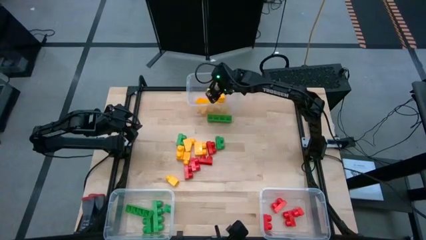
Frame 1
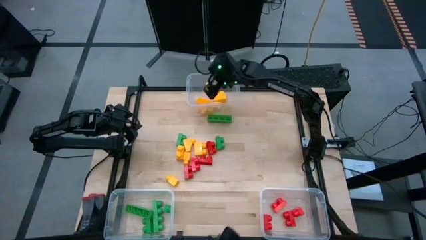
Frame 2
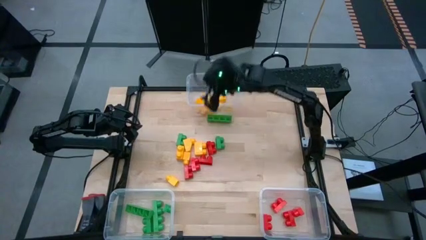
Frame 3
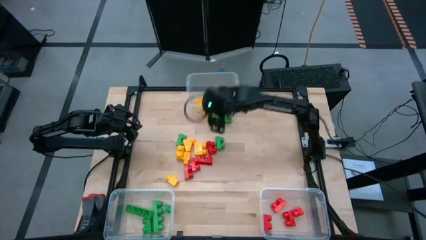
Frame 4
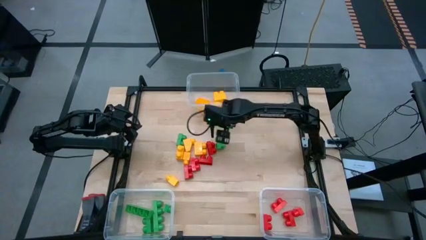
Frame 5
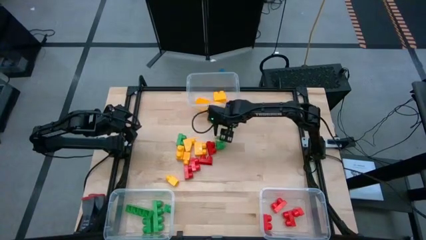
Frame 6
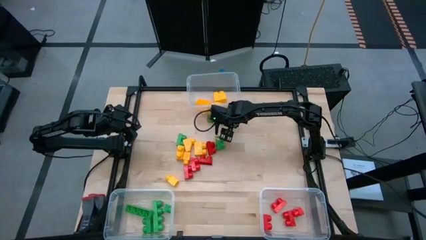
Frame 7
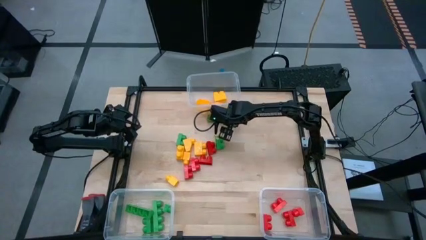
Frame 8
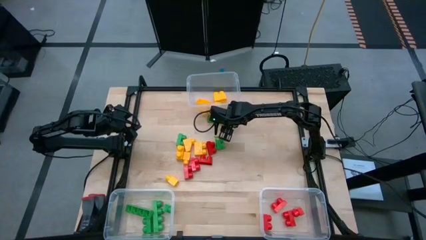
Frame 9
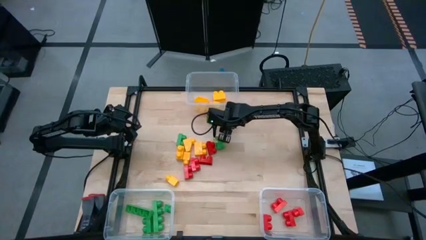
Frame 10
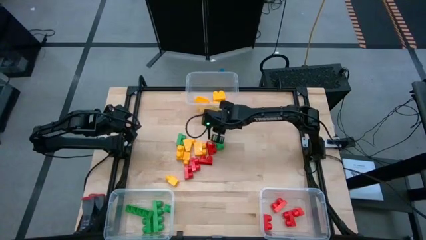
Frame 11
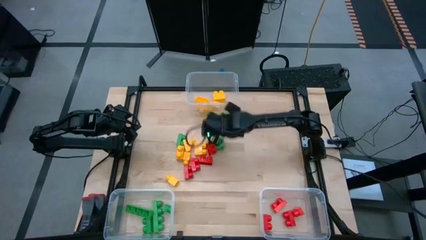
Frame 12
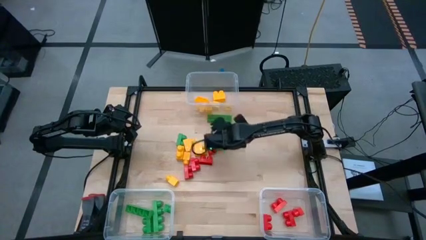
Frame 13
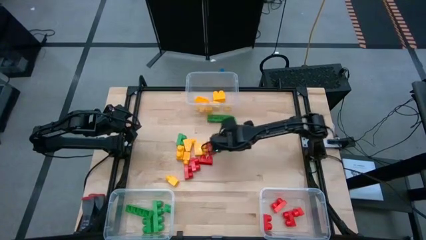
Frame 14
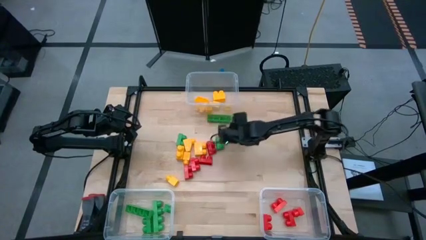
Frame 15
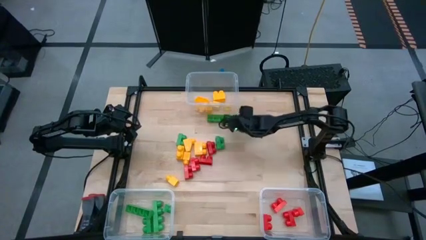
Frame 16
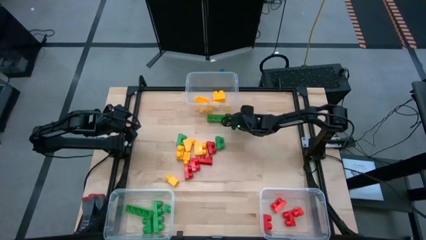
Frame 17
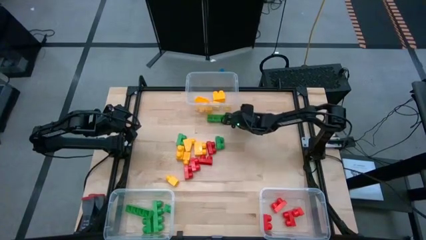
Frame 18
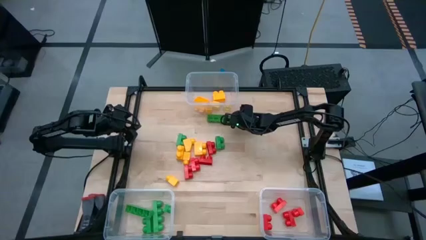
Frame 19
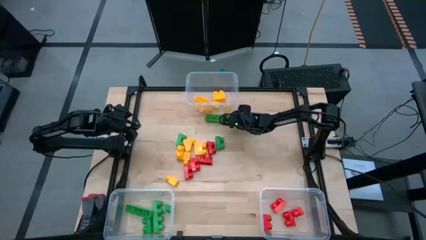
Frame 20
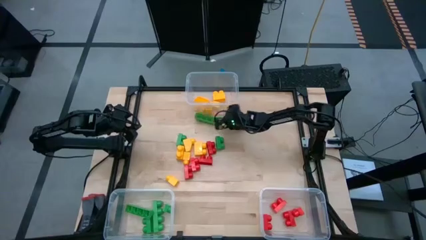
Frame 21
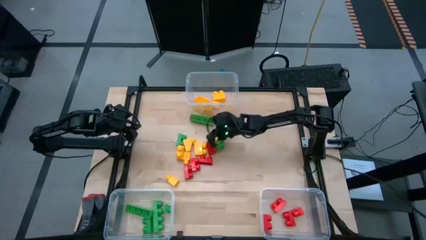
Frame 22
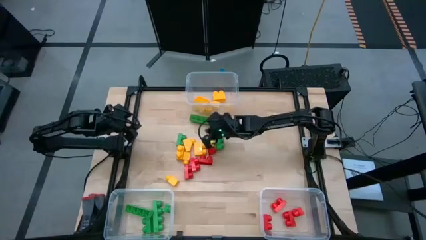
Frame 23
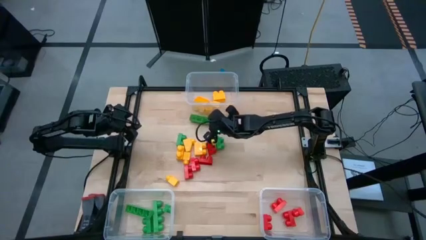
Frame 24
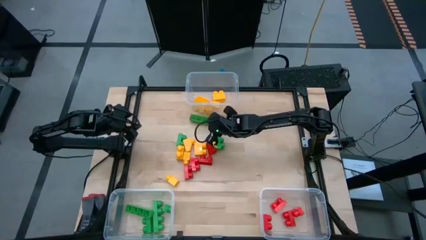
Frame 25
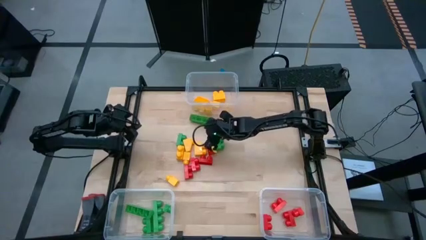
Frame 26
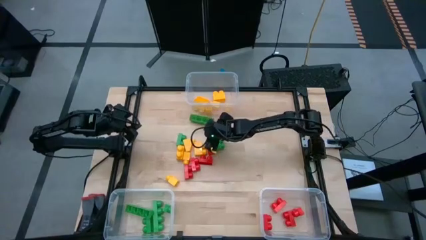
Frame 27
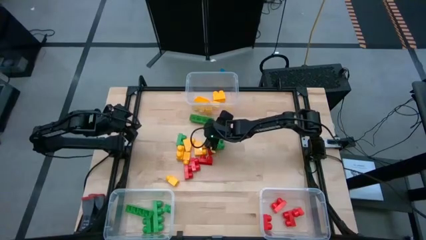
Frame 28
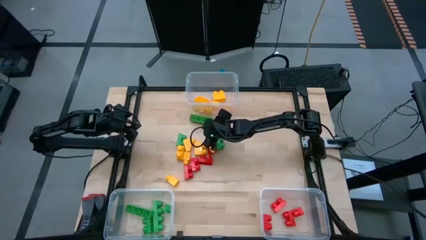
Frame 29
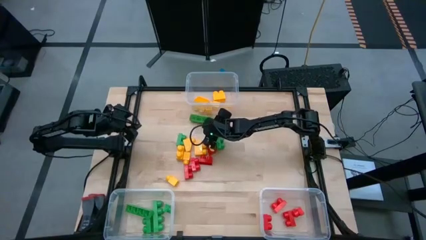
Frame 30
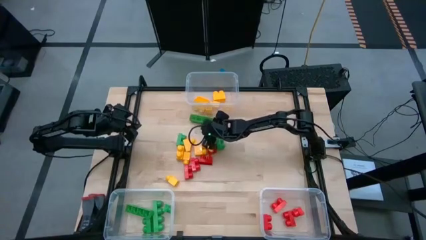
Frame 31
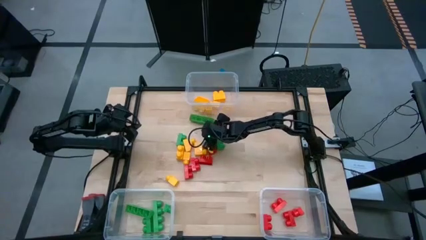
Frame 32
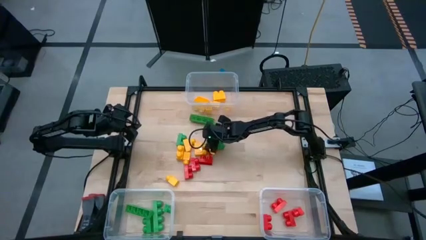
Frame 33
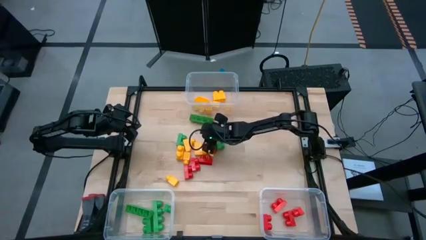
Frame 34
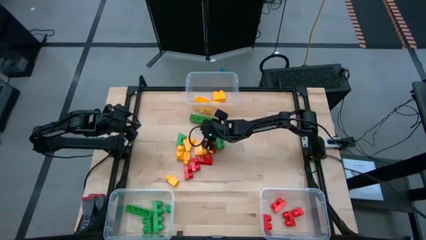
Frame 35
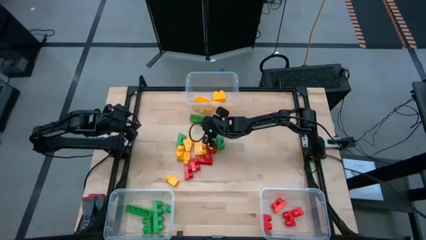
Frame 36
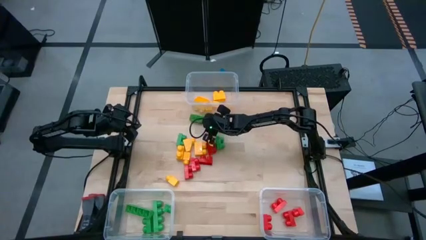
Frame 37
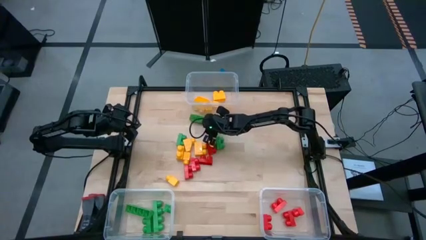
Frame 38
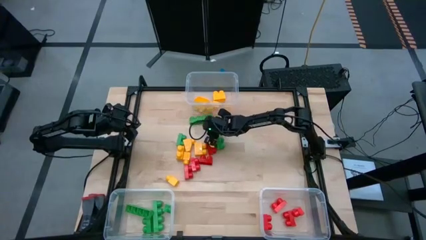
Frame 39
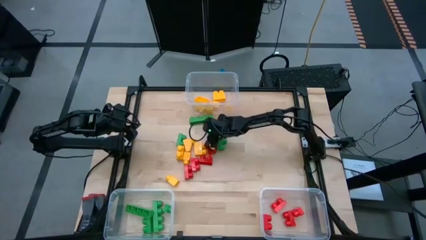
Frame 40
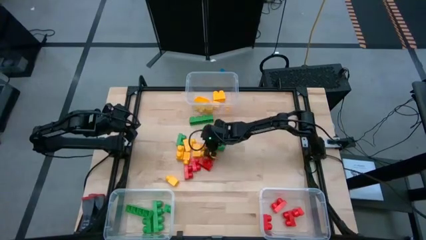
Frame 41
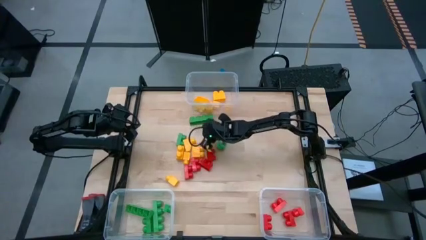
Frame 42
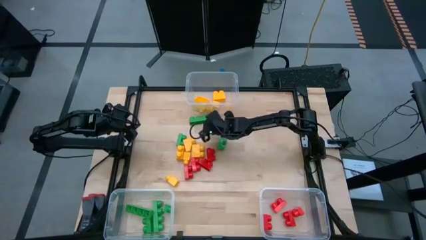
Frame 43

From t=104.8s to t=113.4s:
Task: Sort blocks
Move the green game piece into the top left of the table

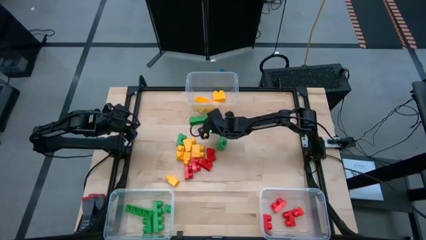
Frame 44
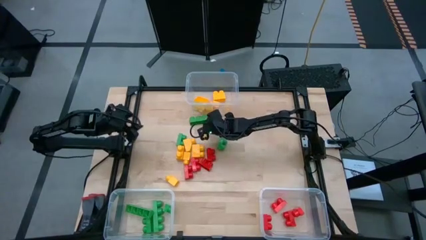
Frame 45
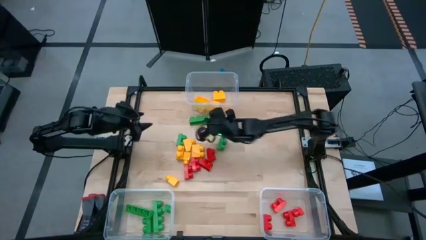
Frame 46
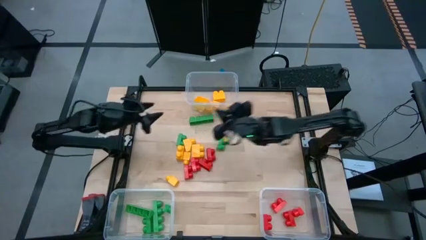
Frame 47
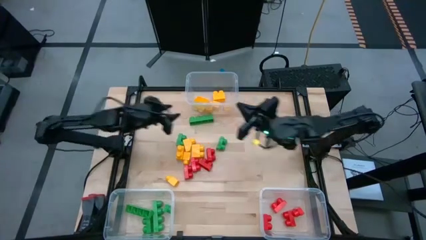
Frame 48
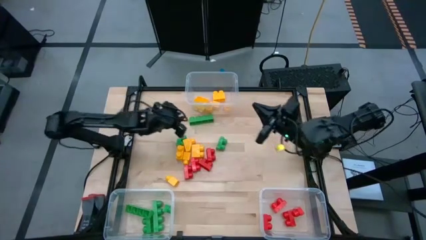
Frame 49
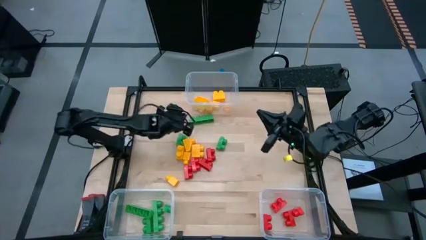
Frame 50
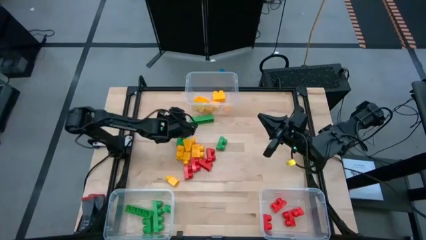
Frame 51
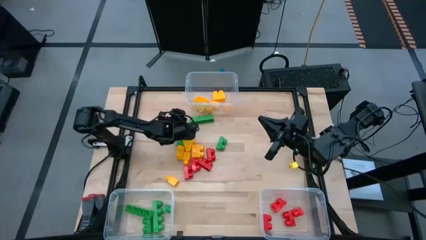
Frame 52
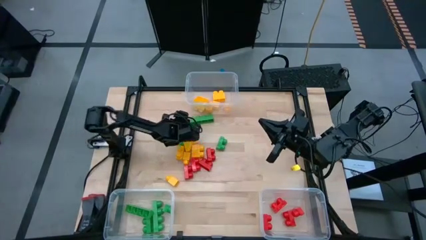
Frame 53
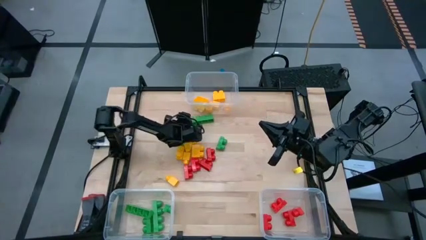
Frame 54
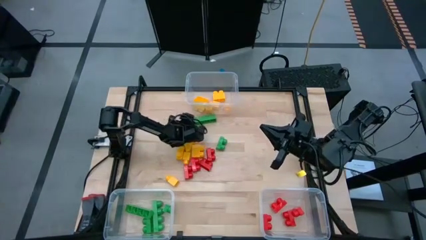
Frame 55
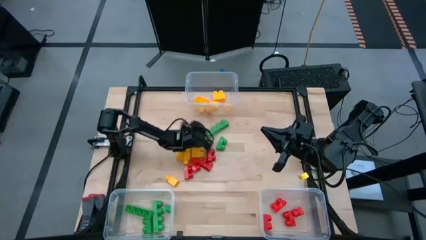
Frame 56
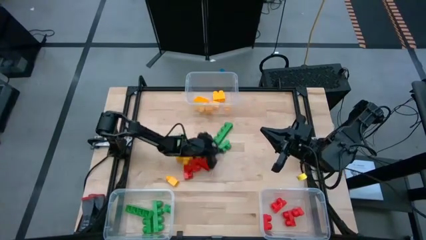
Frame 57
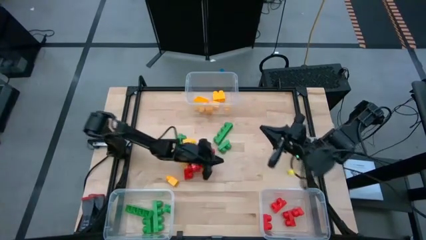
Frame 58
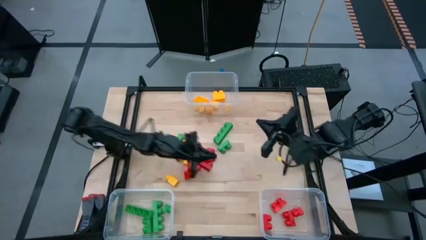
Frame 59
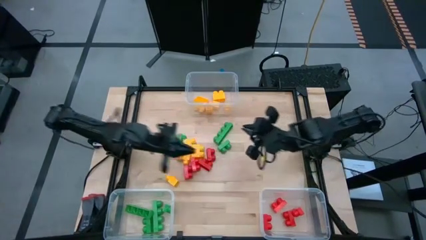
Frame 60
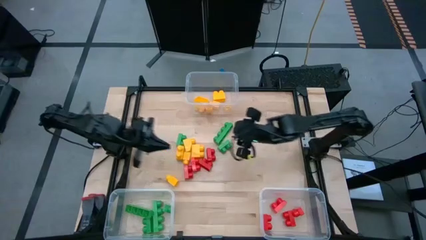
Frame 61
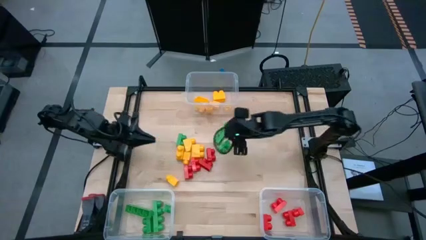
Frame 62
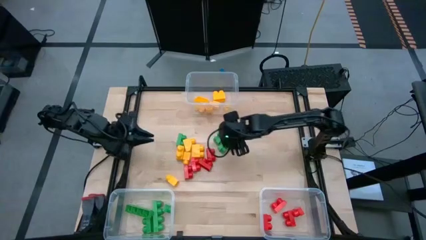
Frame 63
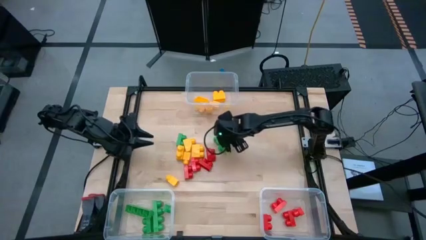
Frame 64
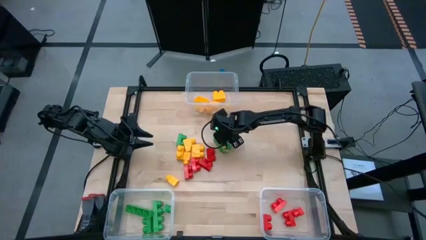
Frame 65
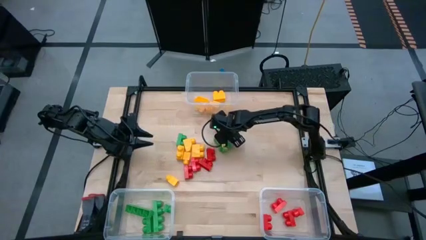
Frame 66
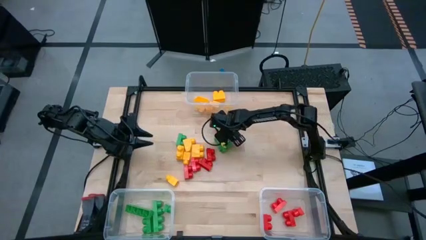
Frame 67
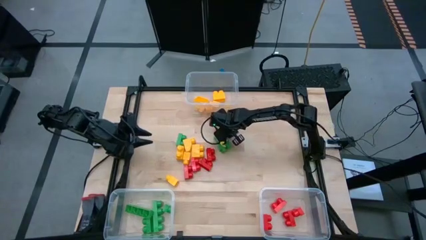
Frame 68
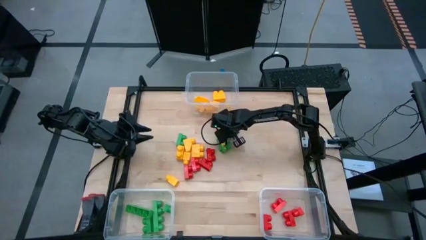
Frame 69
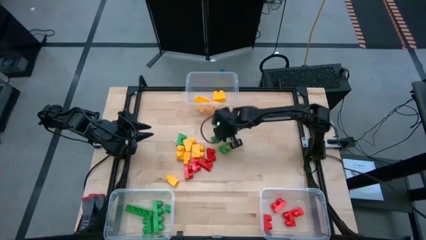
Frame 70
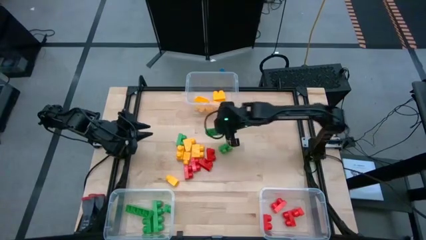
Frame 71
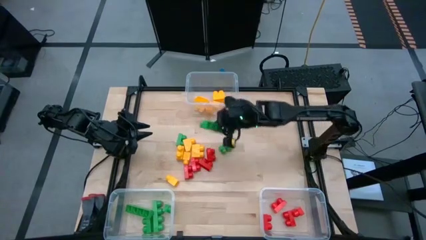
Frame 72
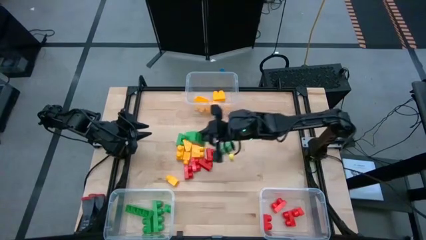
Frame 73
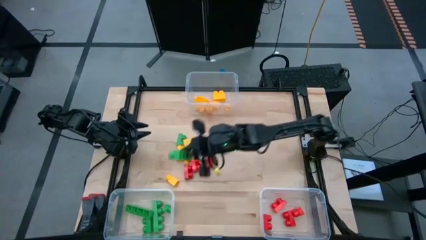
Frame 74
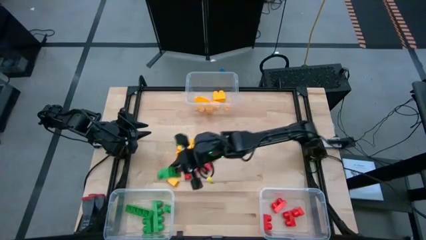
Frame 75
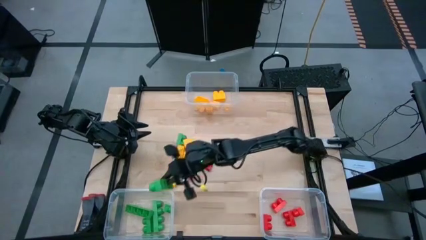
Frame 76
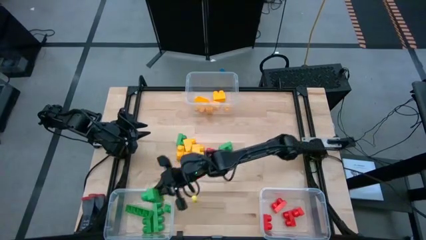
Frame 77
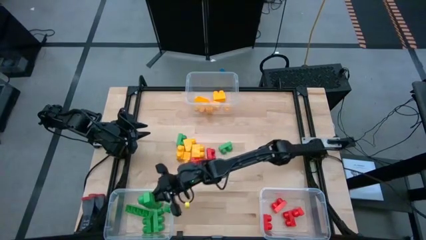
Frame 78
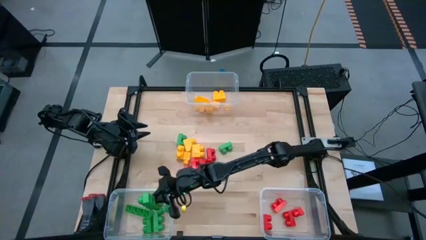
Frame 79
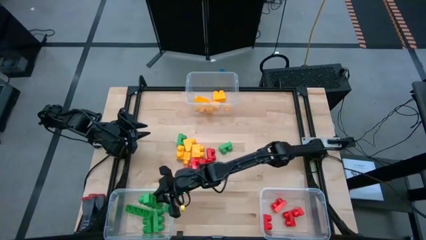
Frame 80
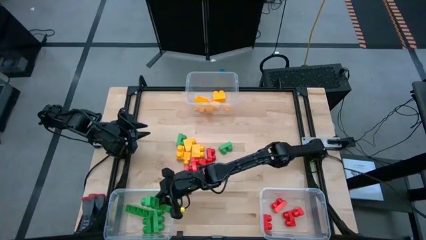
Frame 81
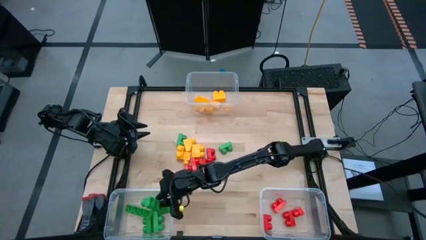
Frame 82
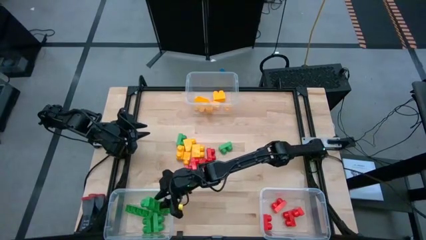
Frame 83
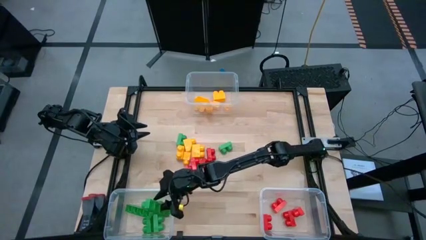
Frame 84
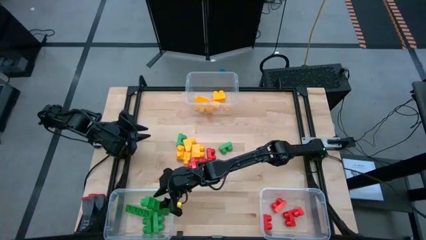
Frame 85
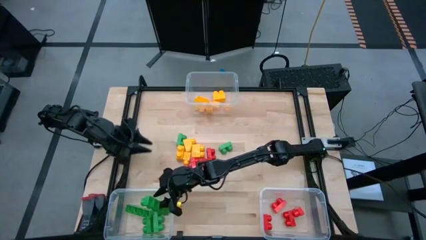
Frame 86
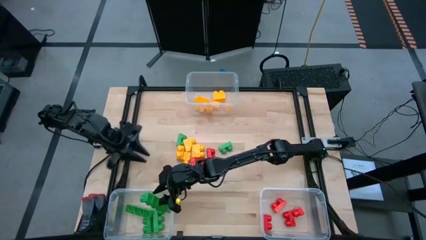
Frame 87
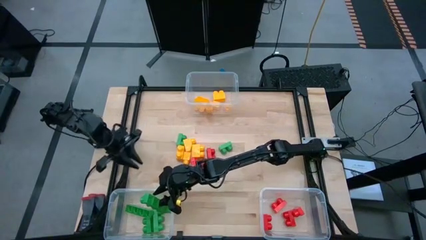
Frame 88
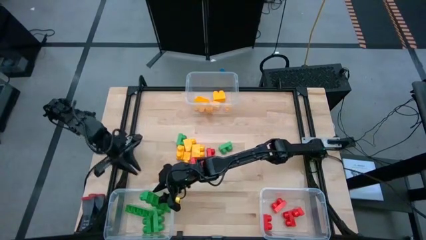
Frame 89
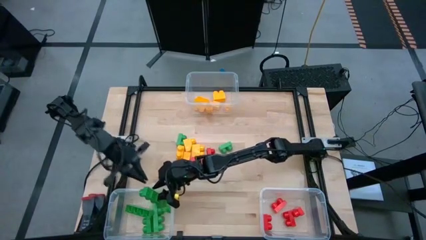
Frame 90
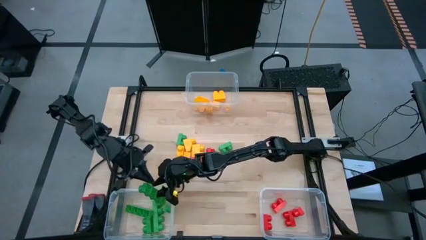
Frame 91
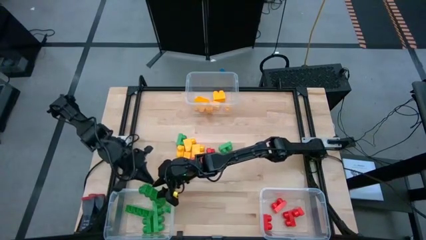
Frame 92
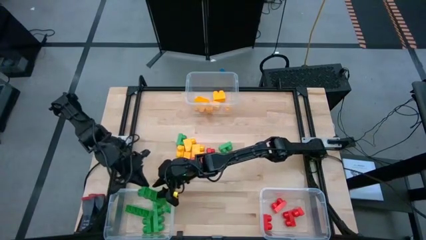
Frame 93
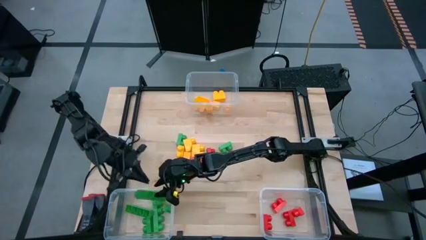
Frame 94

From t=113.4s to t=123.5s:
Put the green game piece into the bottom left transparent bin
